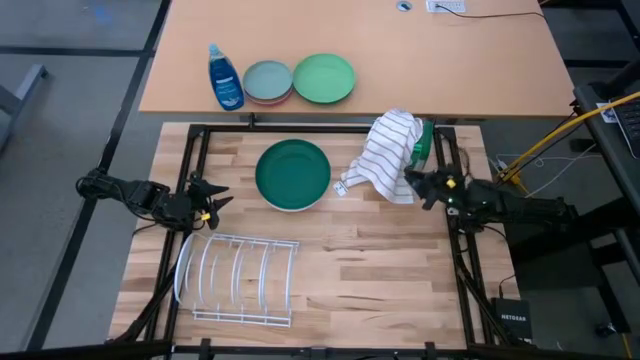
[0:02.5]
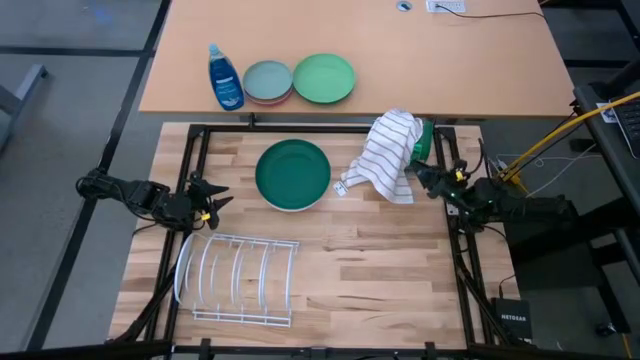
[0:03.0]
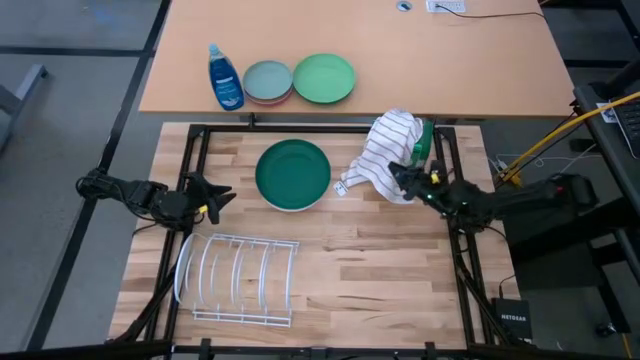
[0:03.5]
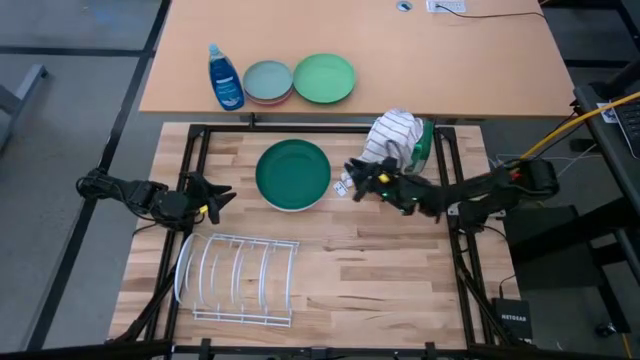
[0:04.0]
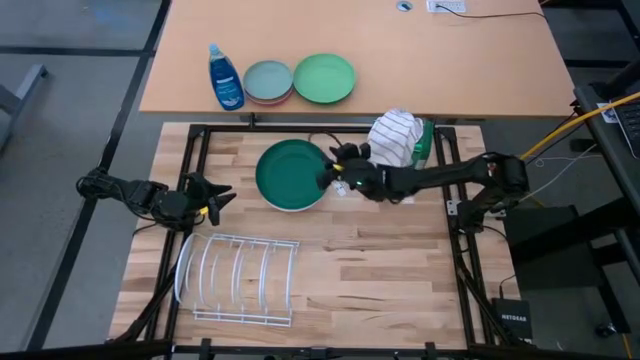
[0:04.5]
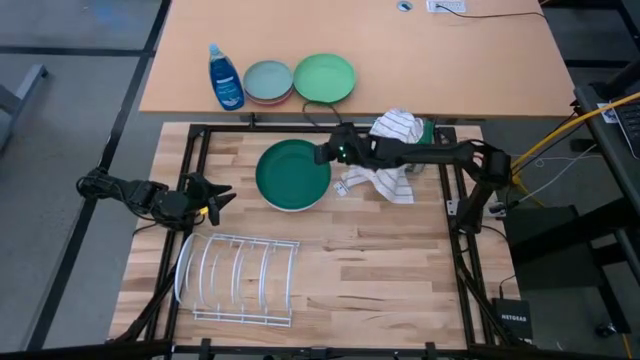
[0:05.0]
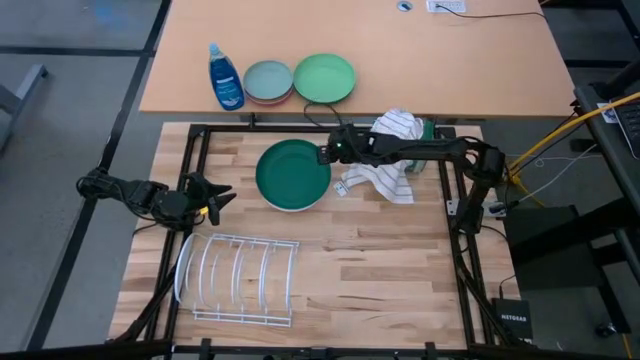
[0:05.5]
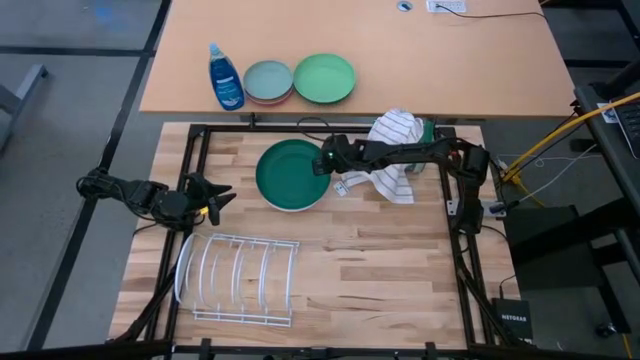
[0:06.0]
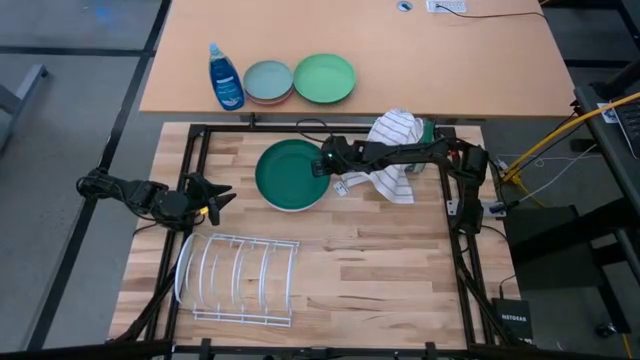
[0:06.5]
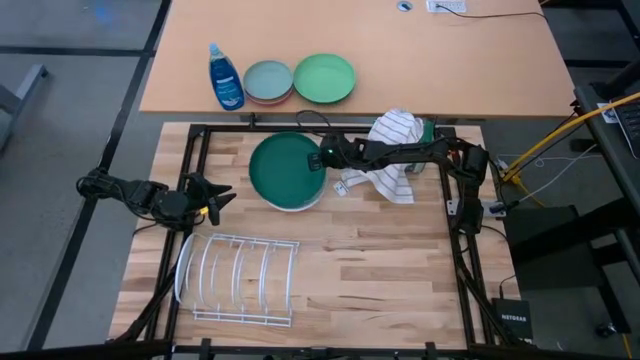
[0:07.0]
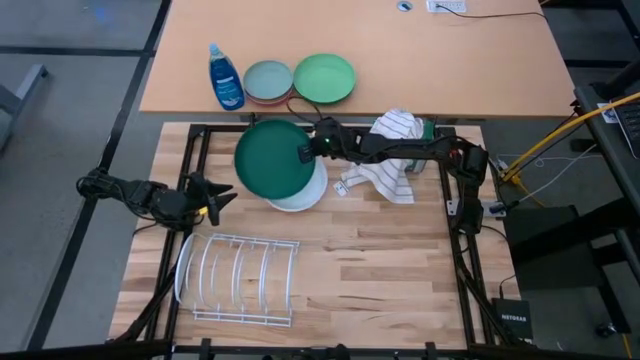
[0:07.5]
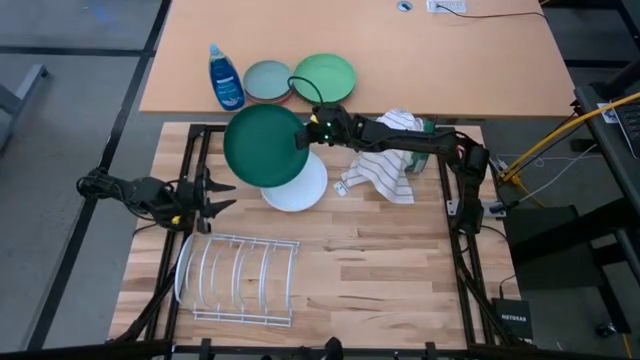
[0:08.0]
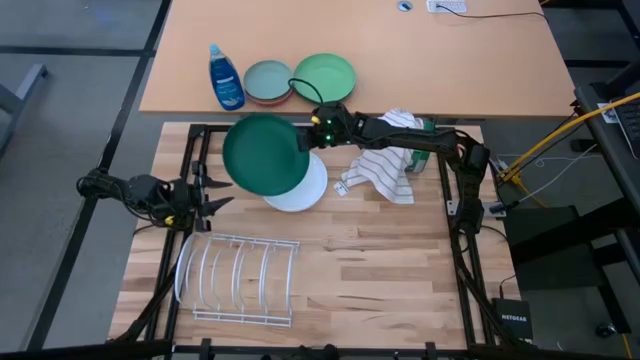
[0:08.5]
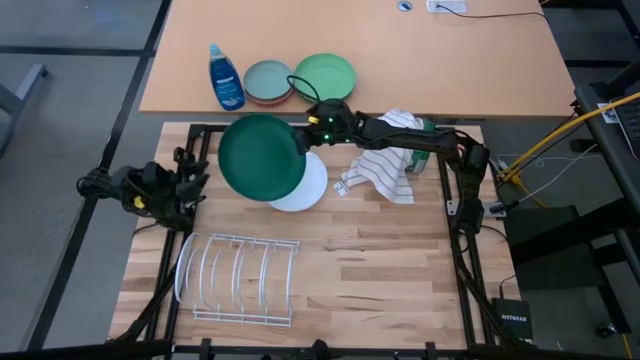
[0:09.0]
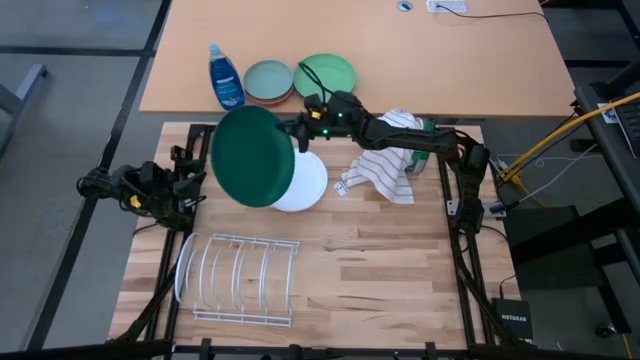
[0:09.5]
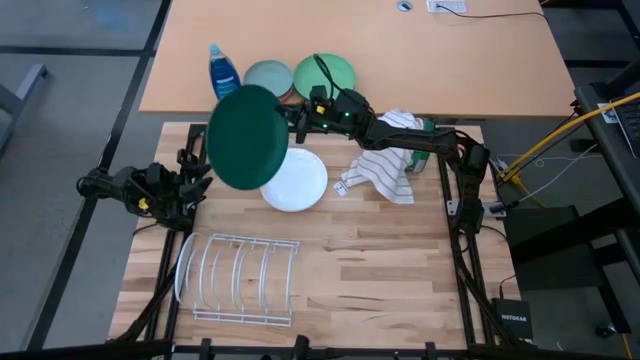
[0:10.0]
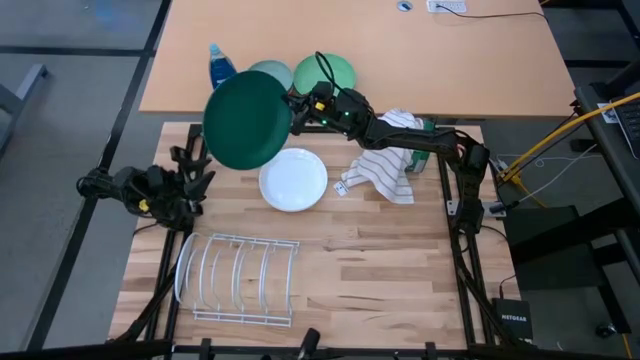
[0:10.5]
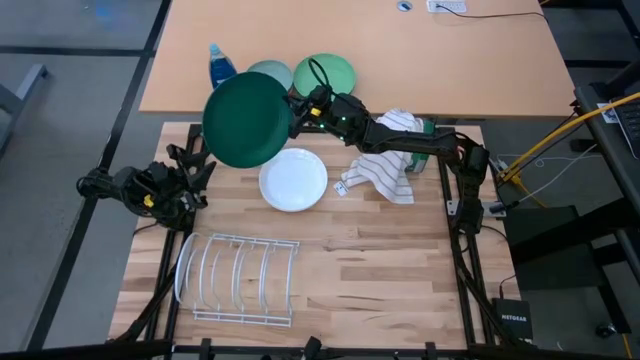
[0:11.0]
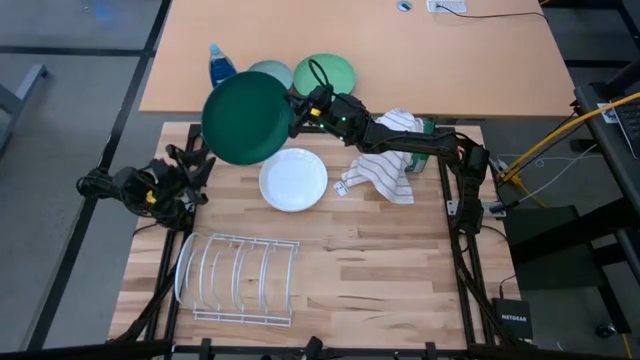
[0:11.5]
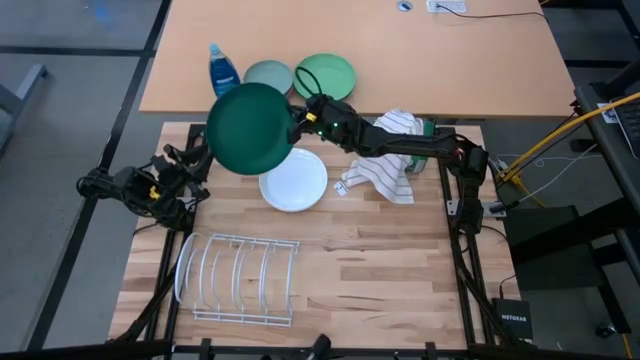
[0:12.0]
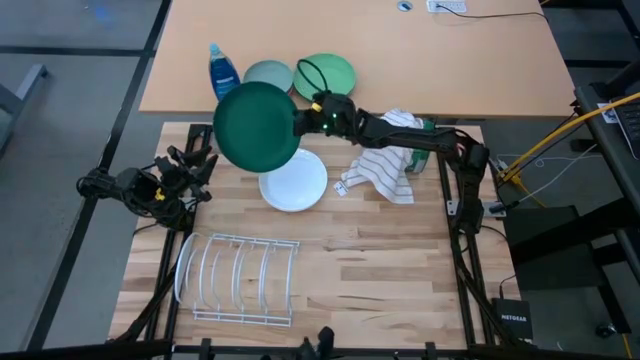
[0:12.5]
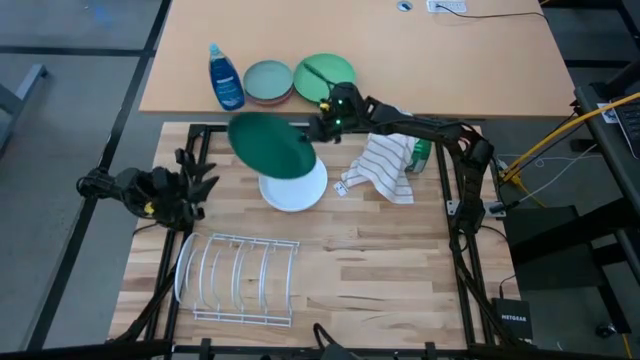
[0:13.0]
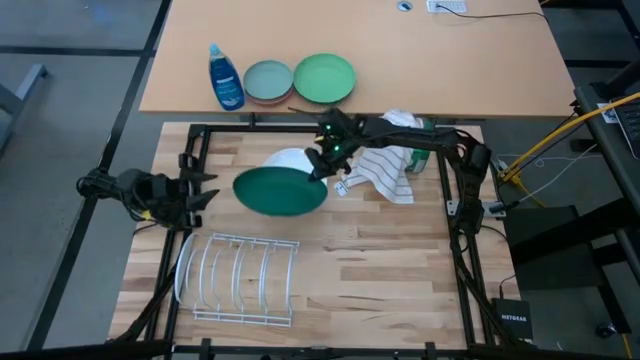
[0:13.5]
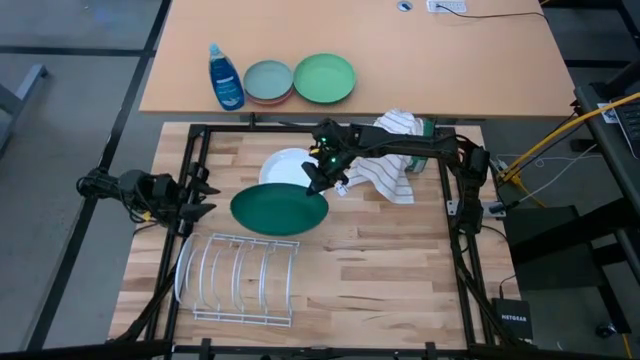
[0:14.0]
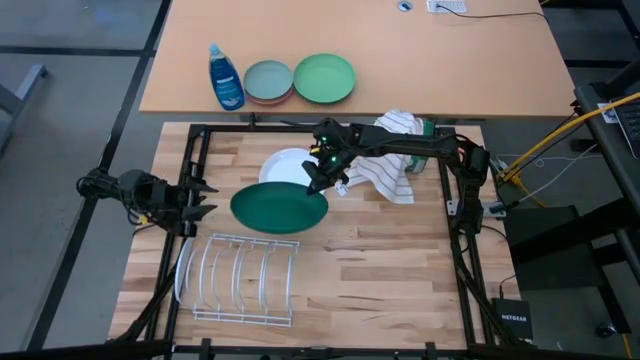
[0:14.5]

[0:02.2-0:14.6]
Task: Sort dishes
Put the green plate in the white dish rack

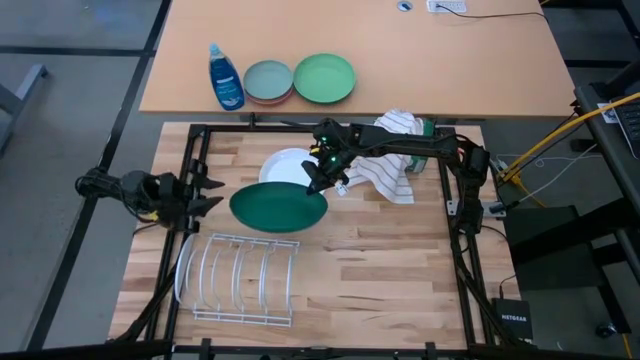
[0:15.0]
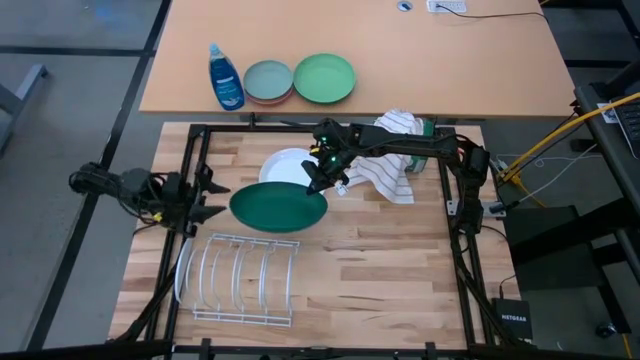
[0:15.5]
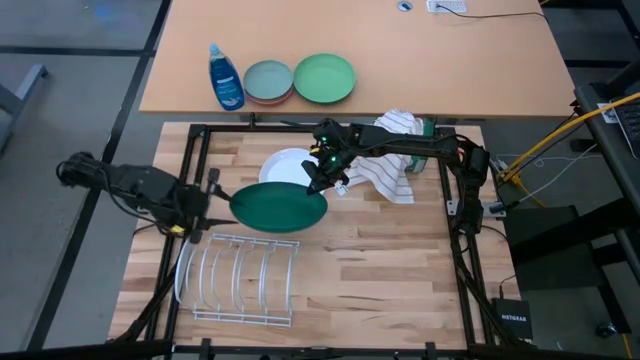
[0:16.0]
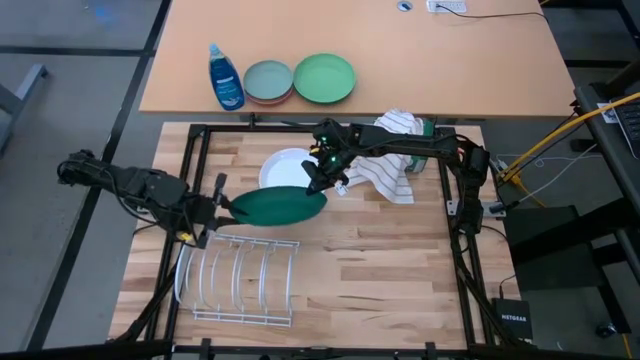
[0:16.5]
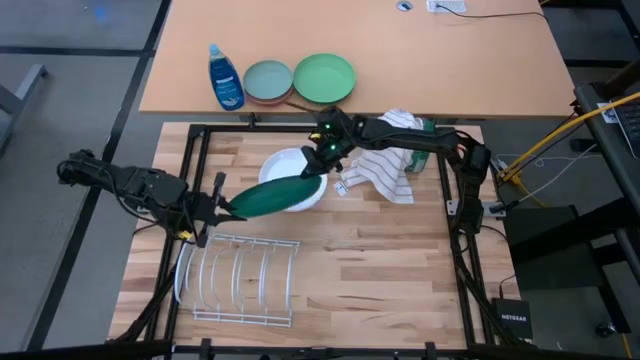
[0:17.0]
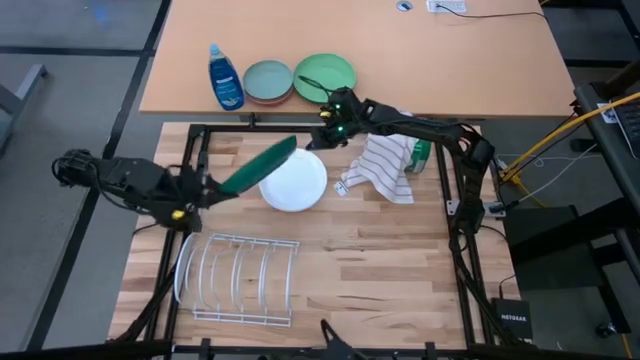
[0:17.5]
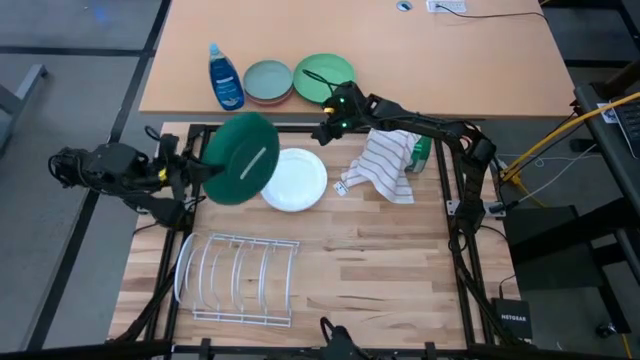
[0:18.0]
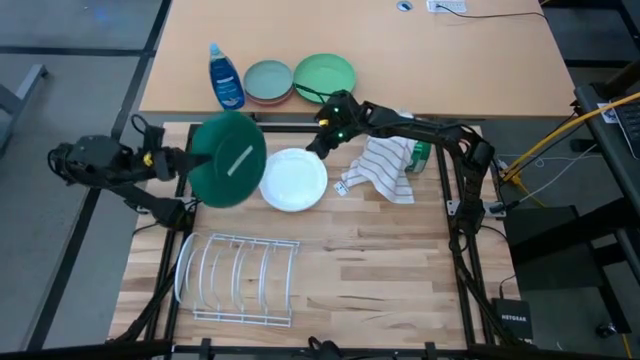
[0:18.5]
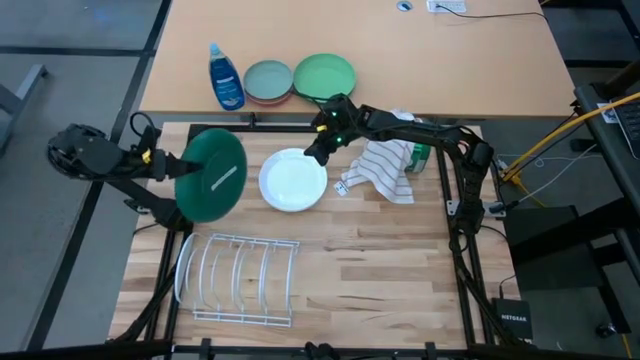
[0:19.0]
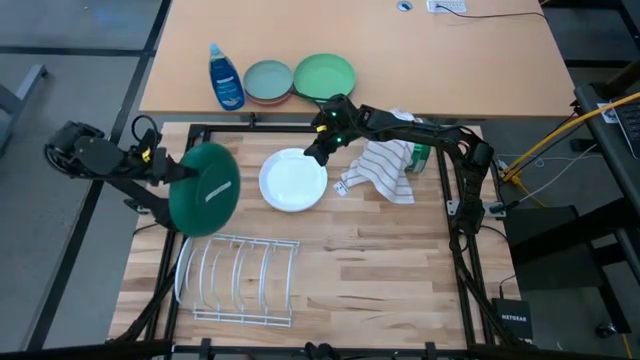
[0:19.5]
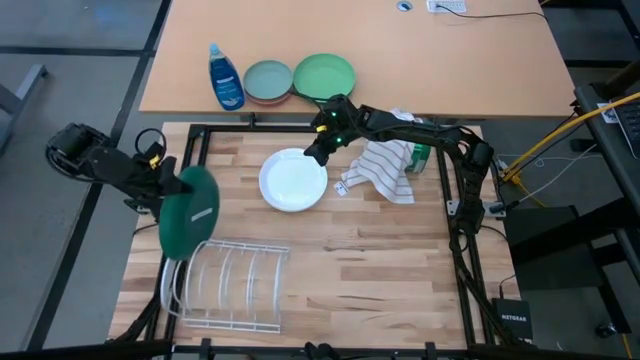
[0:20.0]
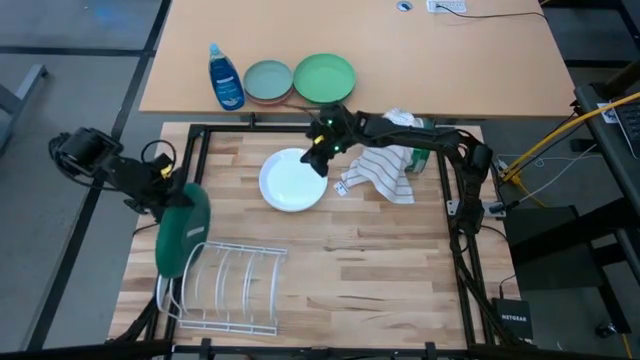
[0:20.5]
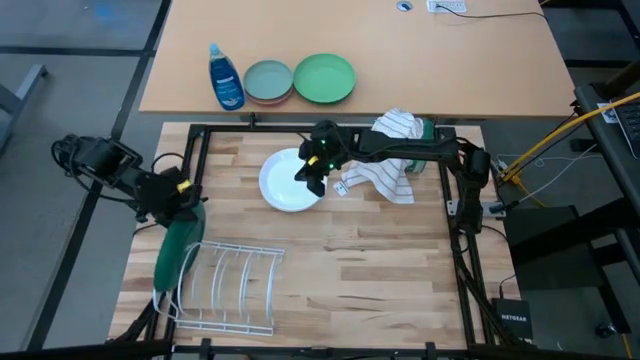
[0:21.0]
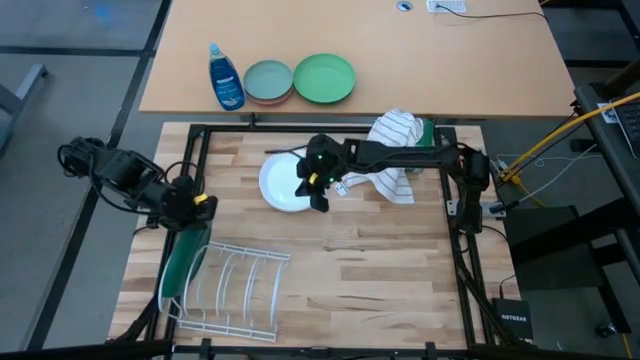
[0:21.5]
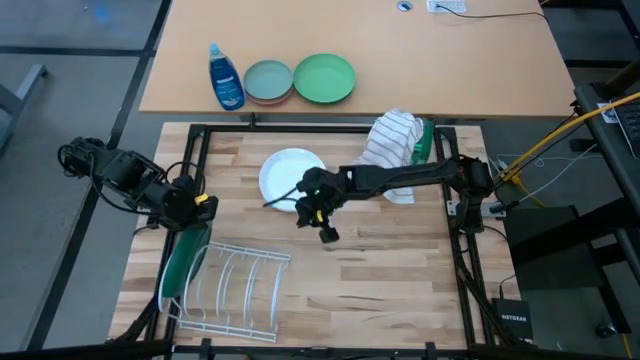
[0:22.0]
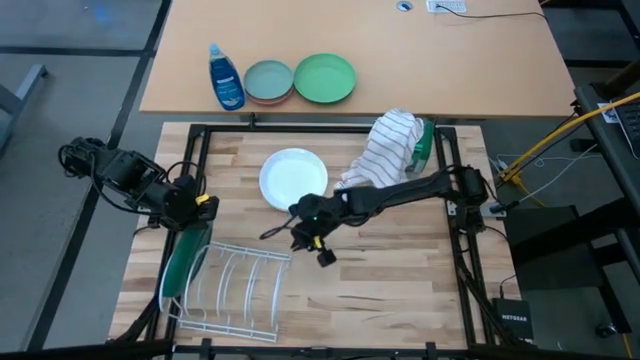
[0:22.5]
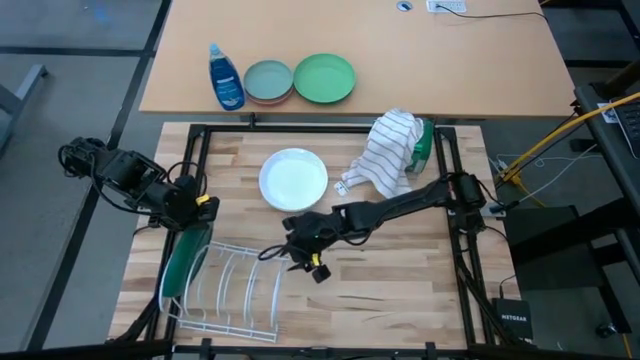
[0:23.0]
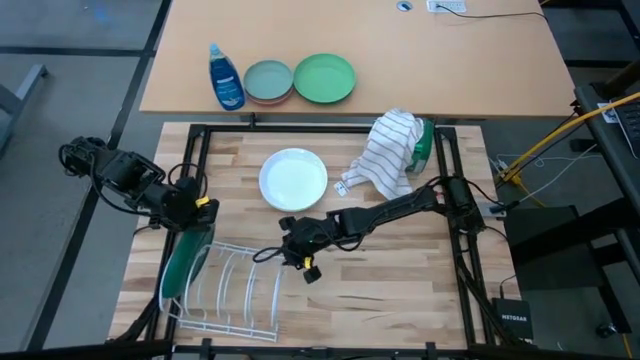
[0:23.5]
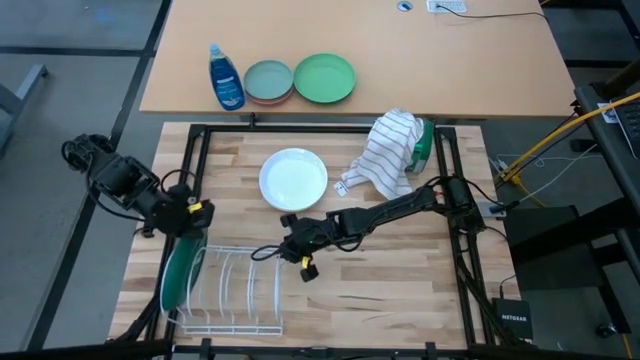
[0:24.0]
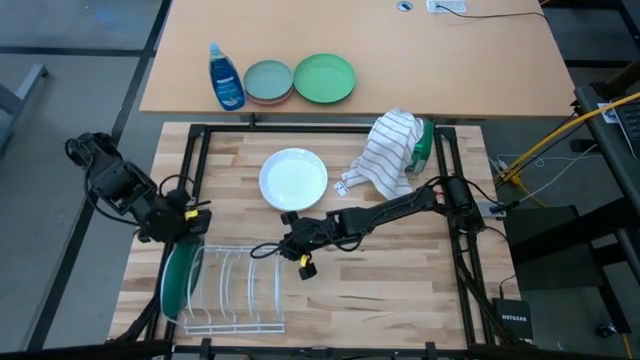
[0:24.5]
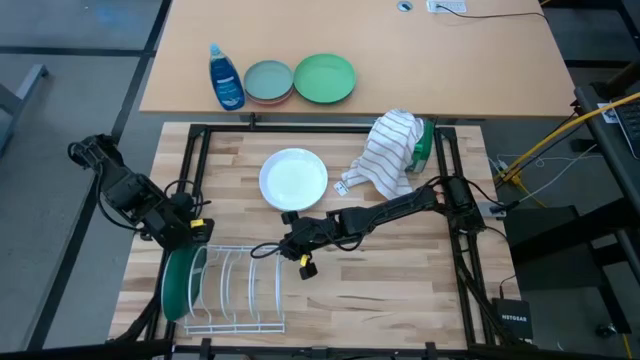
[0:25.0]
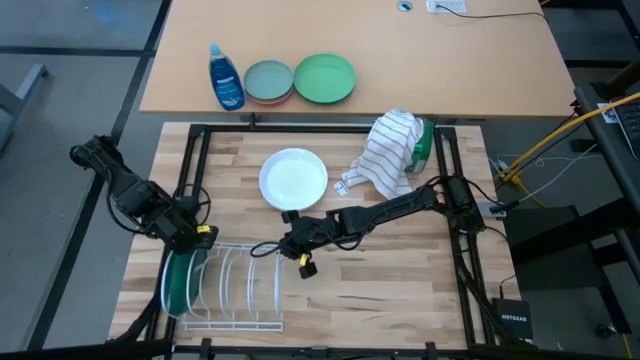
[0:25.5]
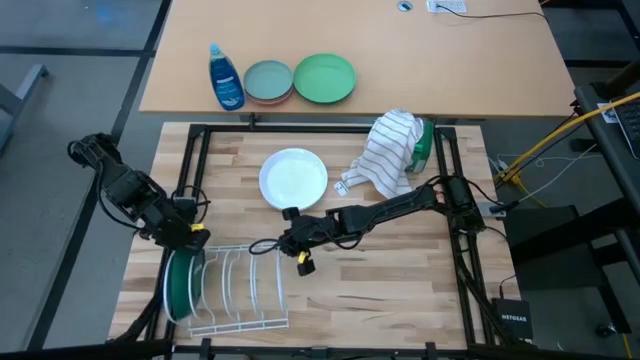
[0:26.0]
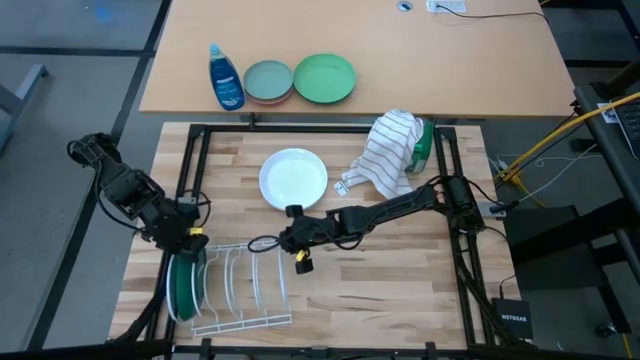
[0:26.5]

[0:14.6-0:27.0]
Put the green plate in the white dish rack
